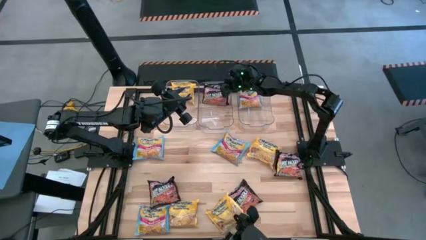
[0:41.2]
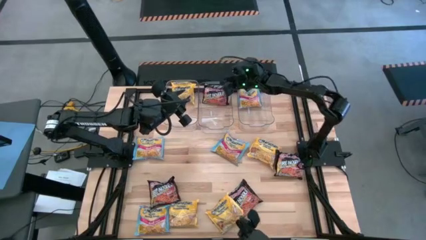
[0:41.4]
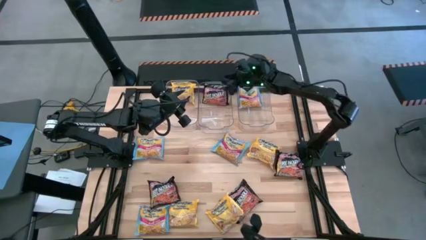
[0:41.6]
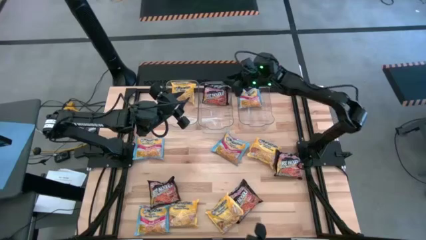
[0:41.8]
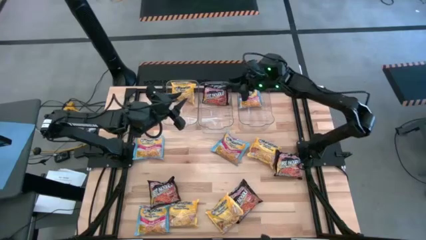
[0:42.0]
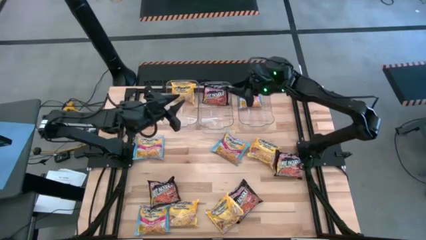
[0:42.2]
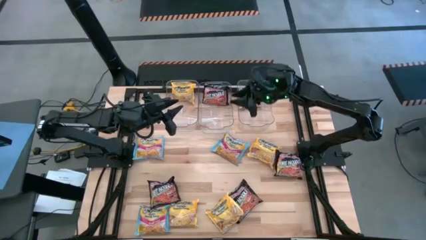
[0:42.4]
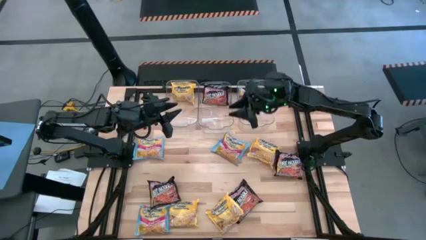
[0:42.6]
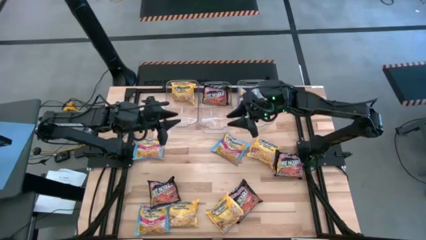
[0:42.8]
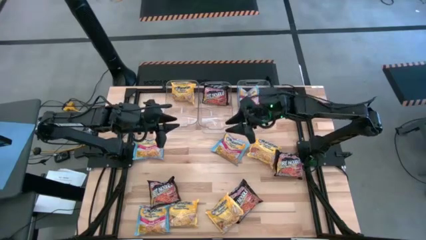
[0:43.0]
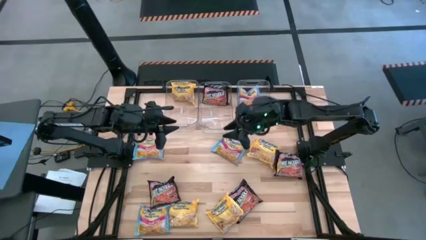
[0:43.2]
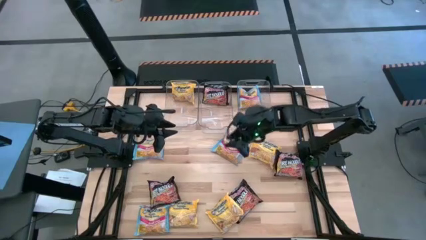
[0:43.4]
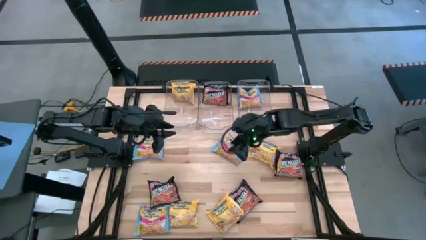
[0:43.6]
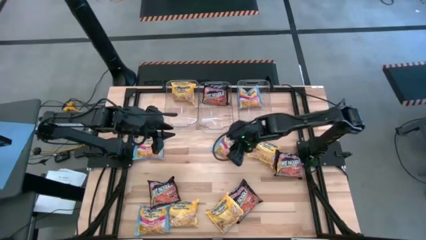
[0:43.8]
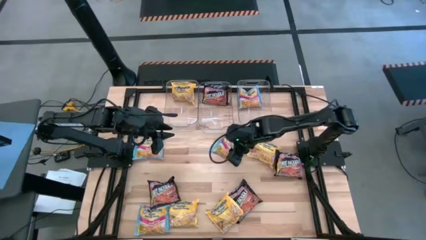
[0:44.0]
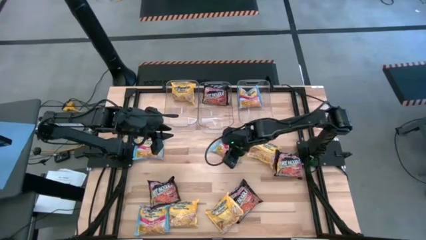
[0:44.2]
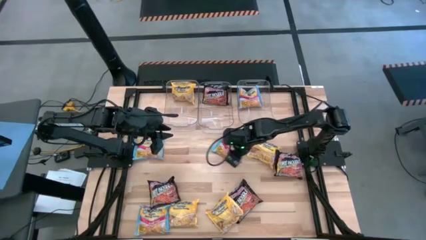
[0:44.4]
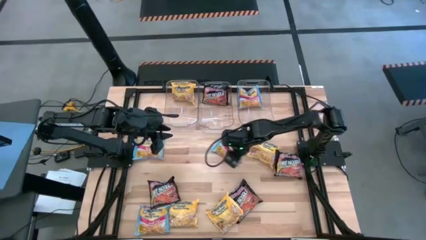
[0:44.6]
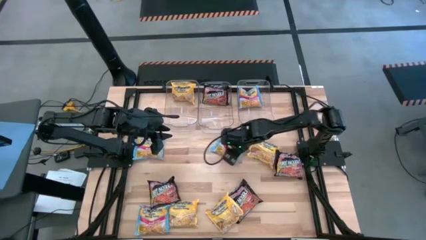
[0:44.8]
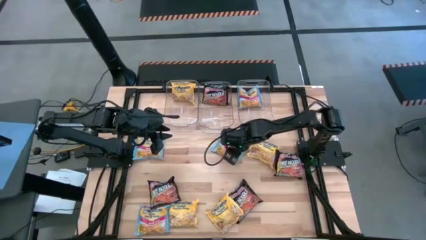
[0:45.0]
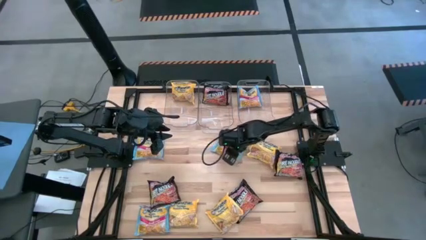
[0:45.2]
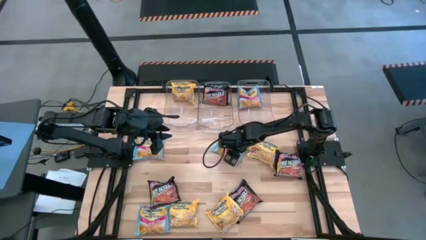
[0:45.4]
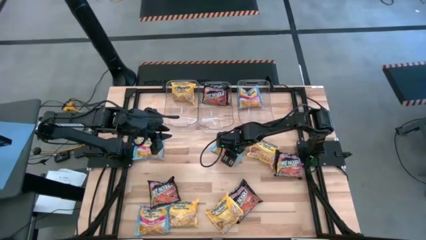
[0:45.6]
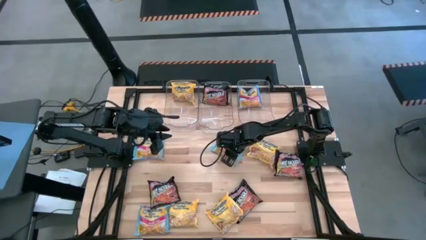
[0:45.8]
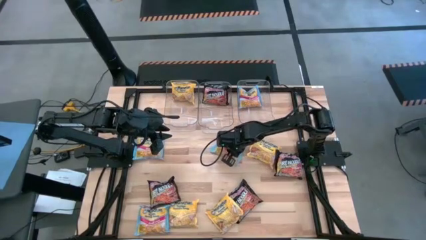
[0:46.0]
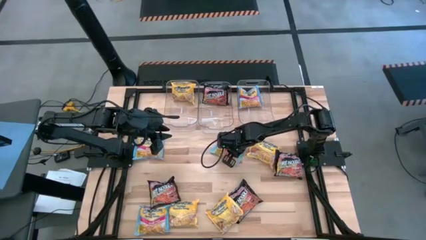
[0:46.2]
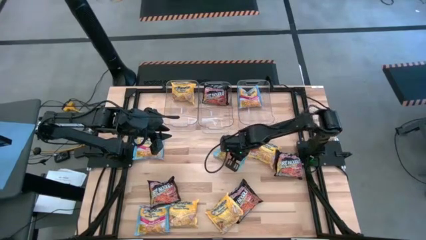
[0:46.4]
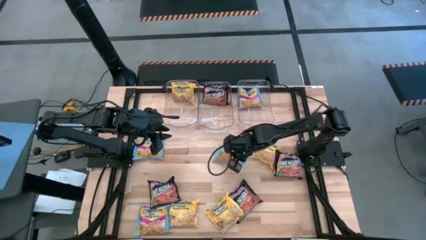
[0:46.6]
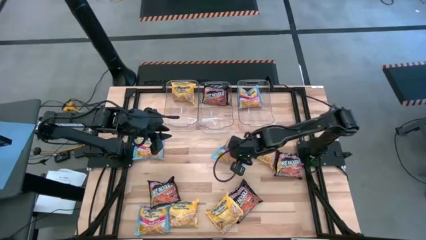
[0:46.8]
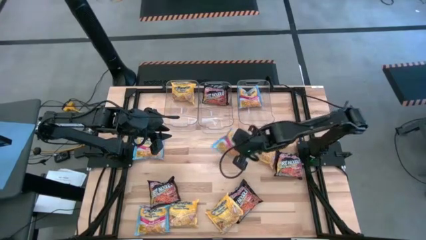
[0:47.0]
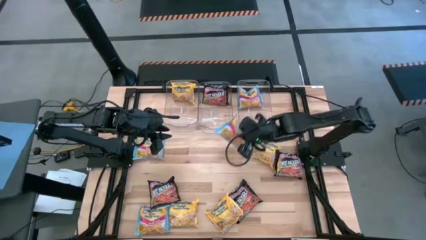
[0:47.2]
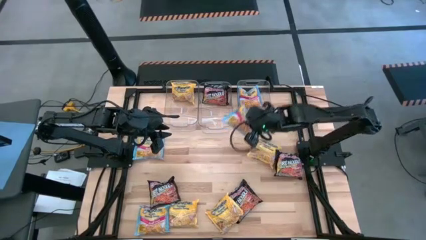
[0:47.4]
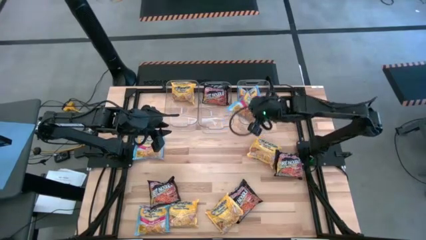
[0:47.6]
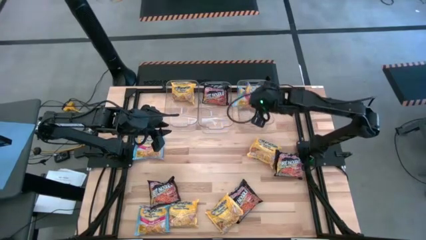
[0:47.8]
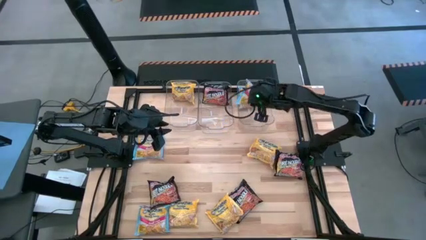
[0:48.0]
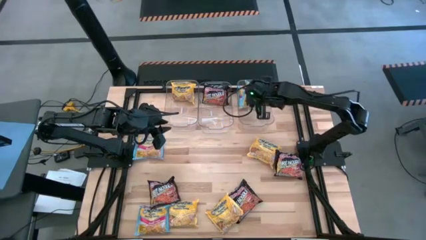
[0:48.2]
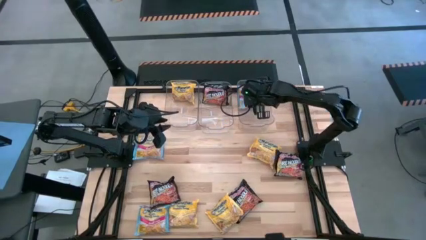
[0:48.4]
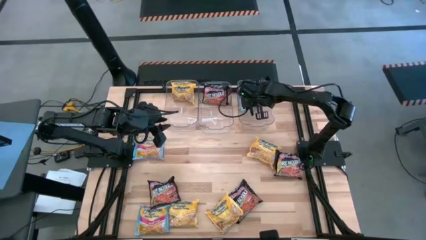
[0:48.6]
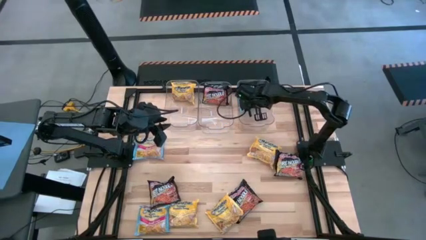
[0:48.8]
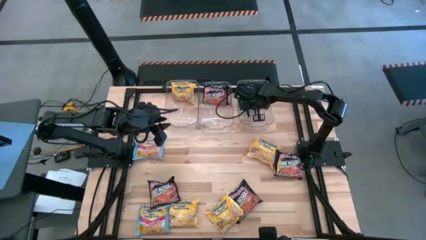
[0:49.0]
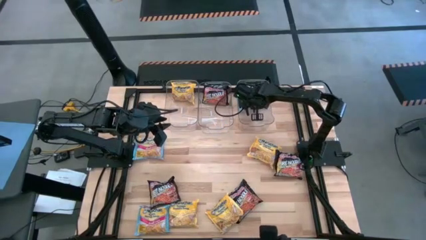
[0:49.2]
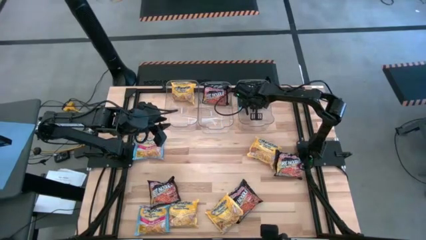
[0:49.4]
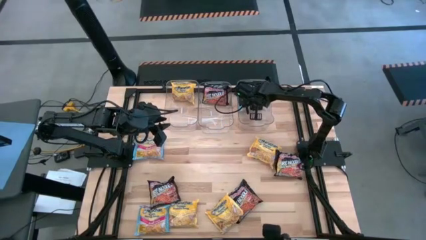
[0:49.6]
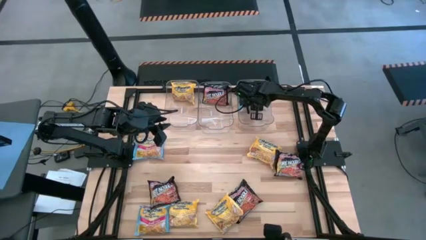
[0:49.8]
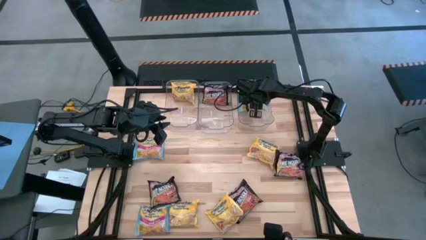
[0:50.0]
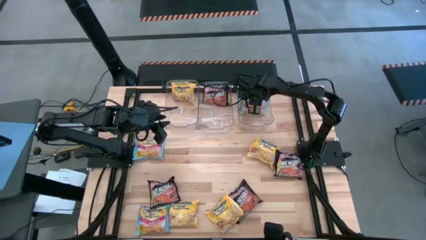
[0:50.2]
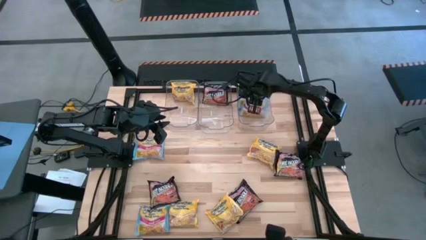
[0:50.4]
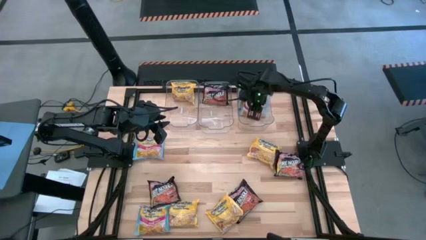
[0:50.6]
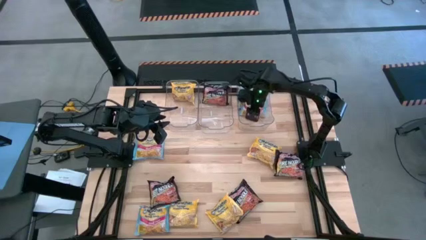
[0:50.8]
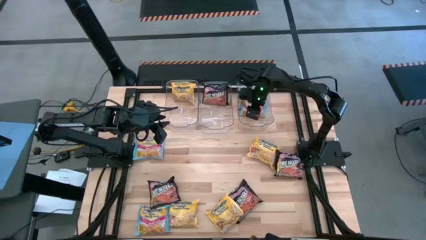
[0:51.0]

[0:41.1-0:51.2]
Task: Sort Maruchan noodles
Put the blue noodle pack in the right transparent bin

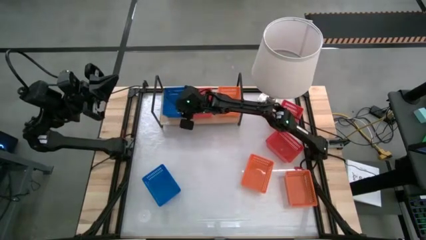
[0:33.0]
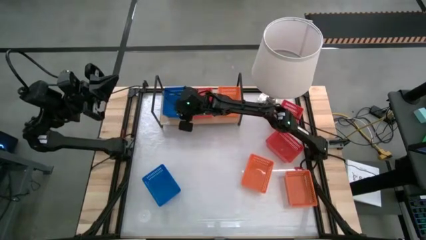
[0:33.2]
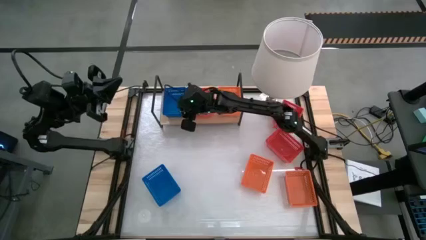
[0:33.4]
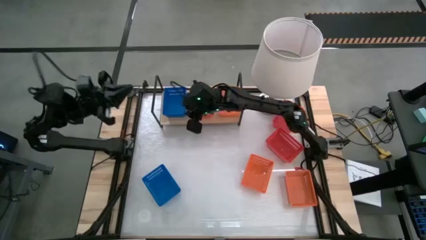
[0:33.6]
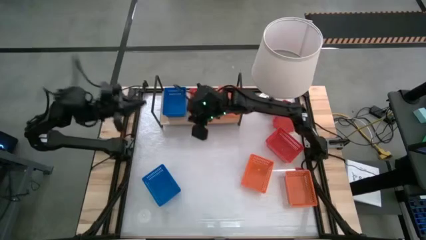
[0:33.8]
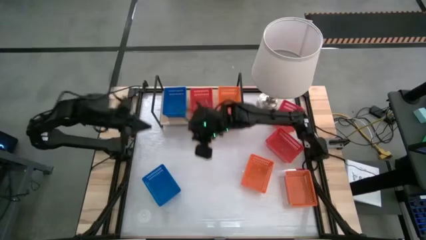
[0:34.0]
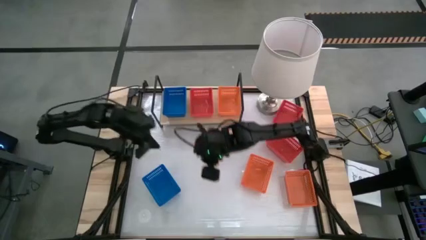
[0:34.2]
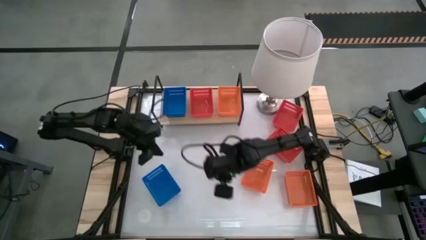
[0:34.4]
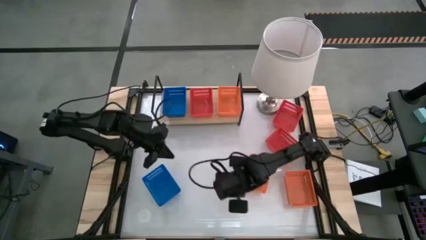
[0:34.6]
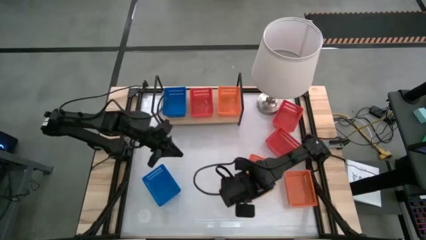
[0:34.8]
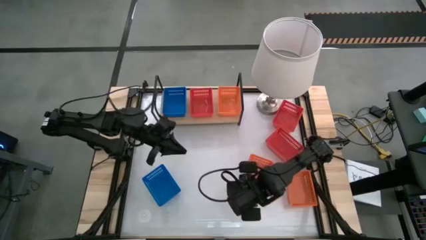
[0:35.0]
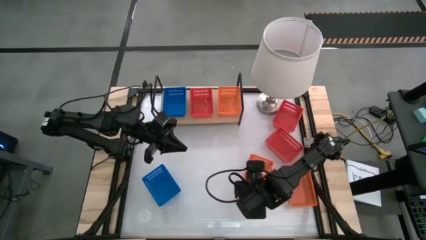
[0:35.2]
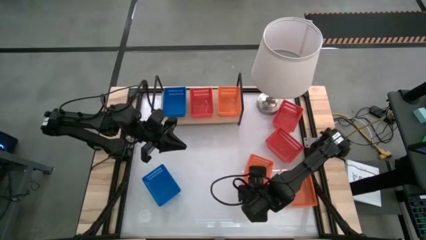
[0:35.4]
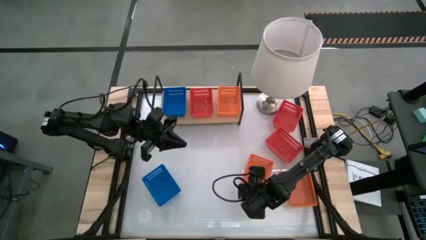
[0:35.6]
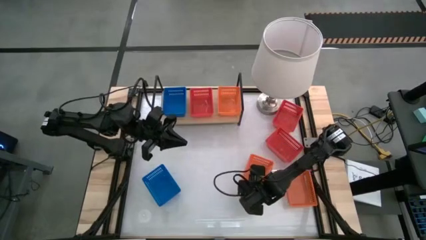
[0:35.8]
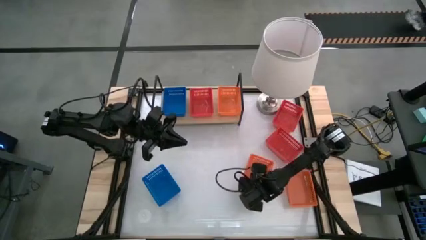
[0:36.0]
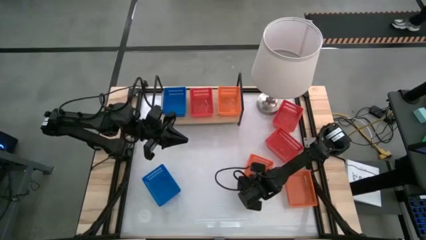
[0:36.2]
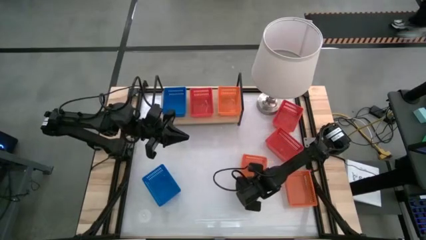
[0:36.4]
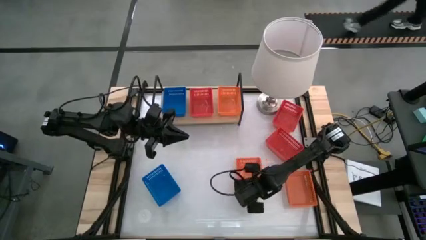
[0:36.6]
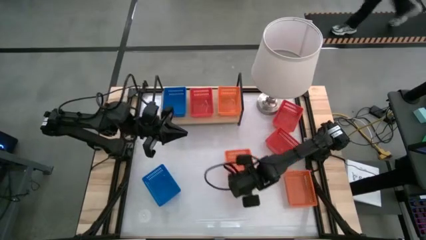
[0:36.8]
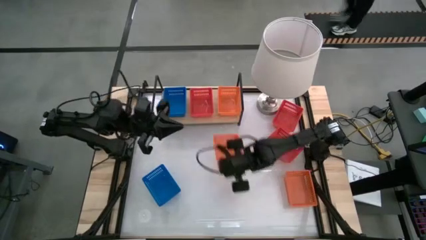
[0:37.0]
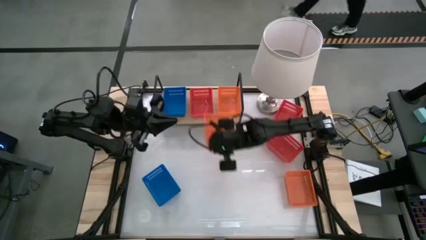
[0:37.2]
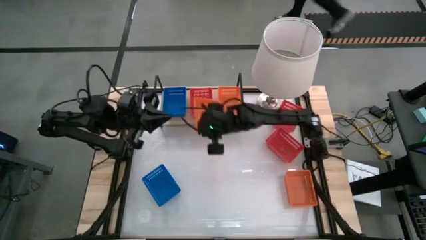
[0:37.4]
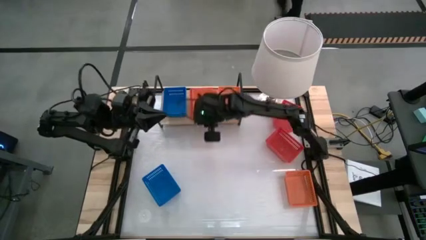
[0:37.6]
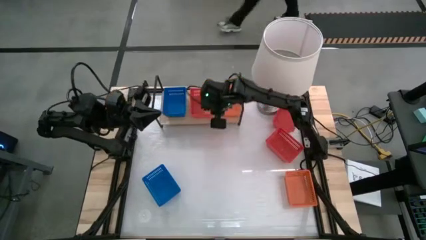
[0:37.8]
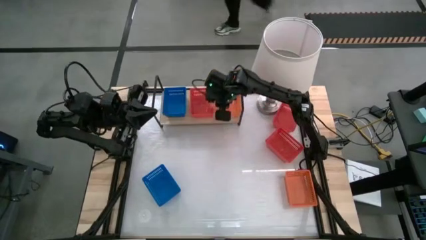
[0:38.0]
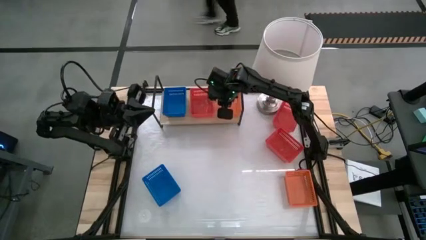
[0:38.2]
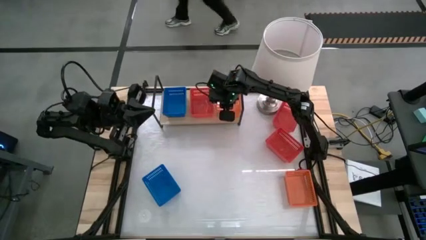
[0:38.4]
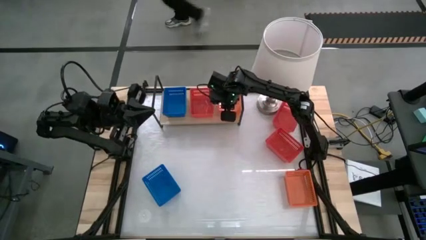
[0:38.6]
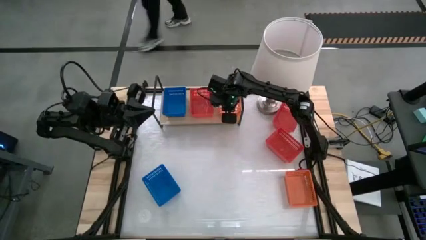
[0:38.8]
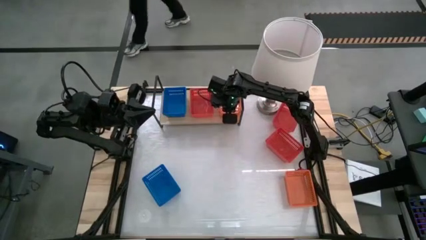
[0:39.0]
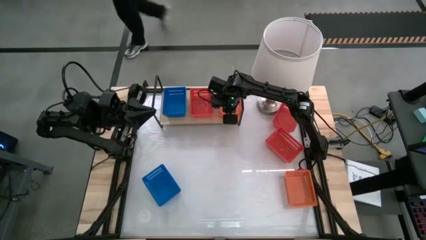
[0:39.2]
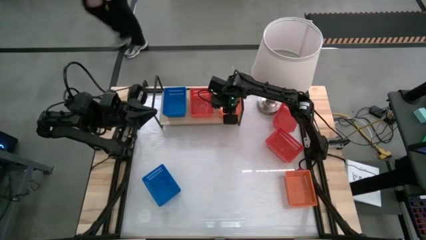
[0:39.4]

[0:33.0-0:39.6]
Task: Stack baskets on shelf by color
Stack the left orange basket on top of the orange basket on the shelf
